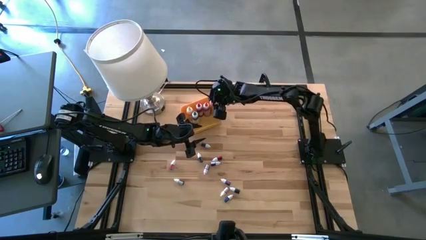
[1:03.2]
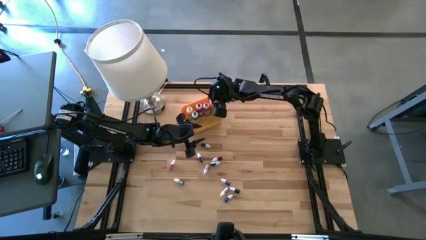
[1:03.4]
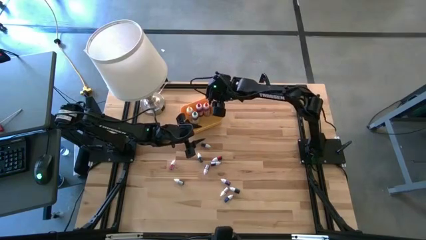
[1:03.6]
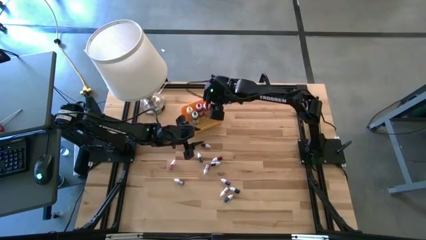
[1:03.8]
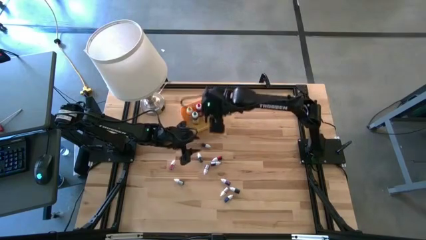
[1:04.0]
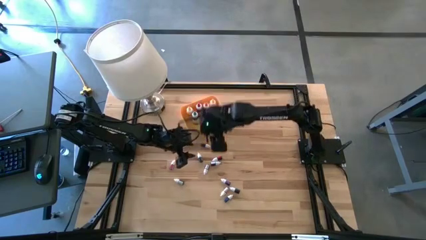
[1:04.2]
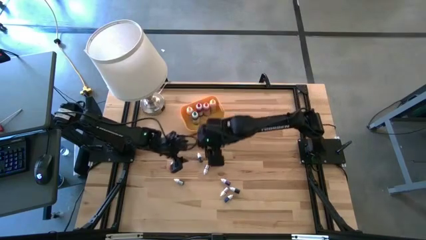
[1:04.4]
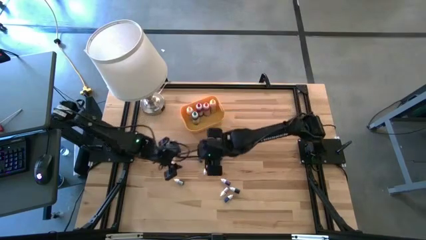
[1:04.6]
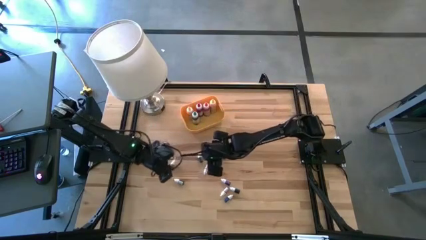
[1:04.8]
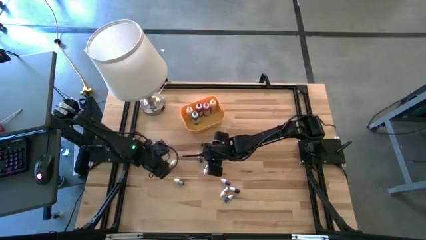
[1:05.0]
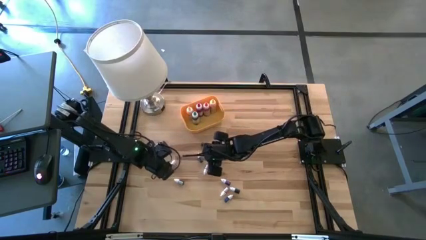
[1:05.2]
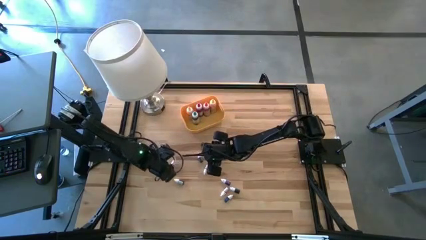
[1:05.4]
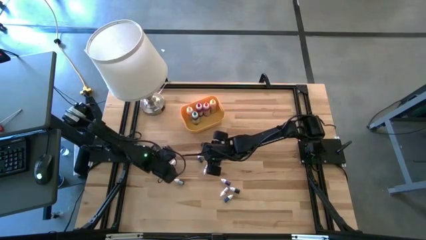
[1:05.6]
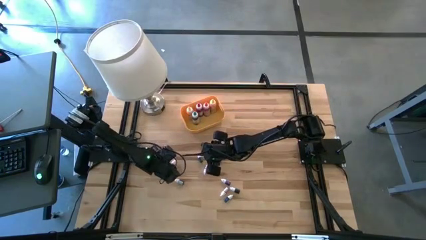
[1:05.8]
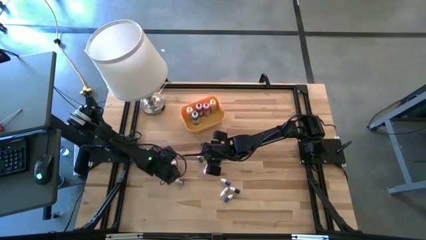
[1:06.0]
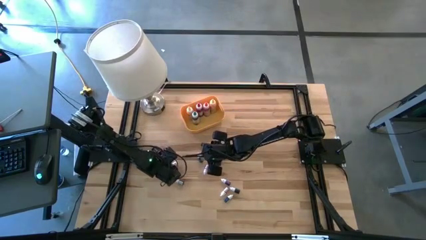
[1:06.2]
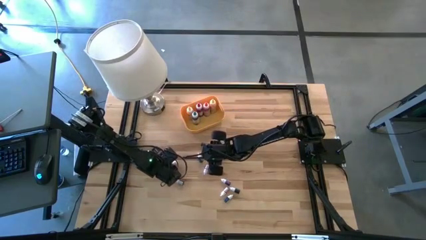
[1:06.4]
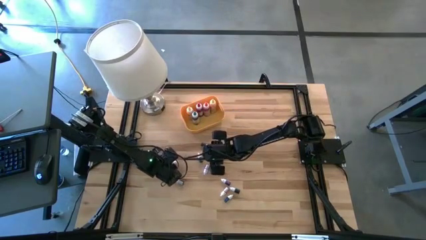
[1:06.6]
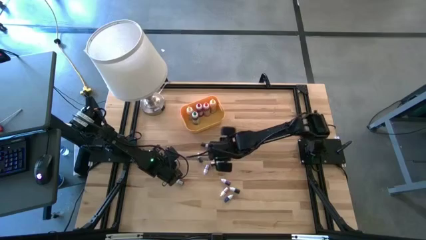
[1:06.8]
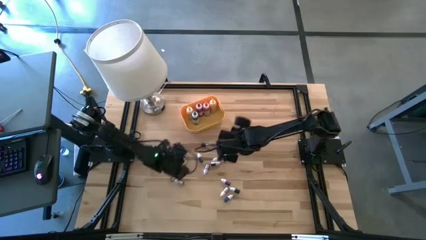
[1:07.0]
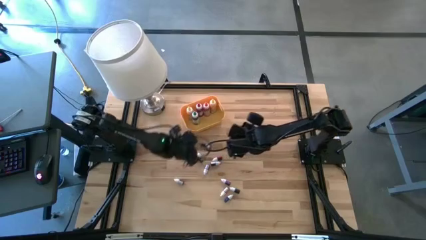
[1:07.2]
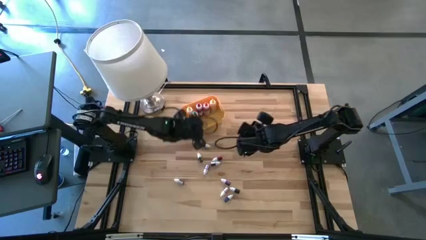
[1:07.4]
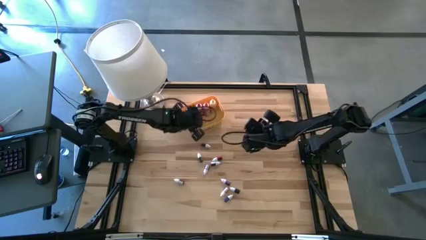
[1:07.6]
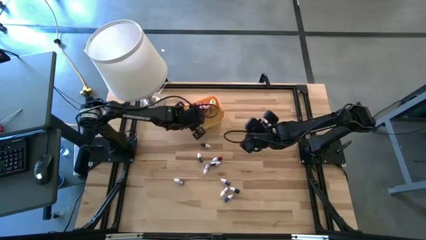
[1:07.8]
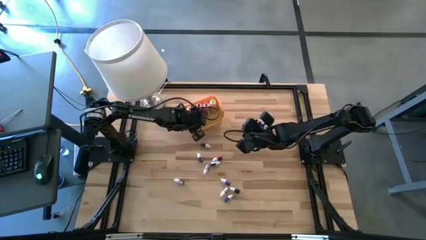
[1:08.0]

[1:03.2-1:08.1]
Task: Pick & Place food coloring
Put the small pink food coloring bottle into the bin

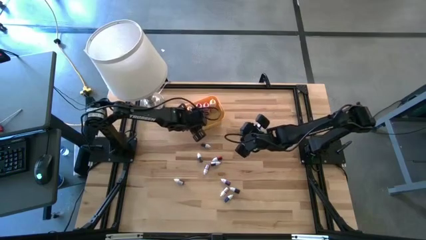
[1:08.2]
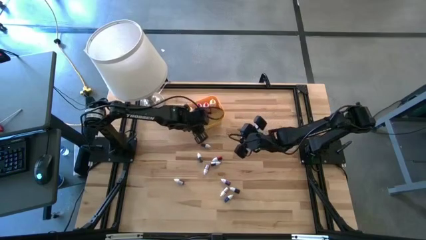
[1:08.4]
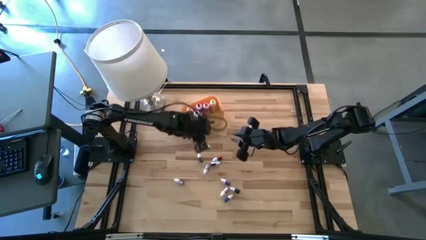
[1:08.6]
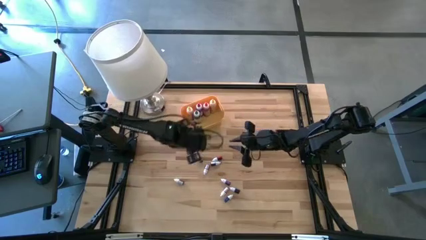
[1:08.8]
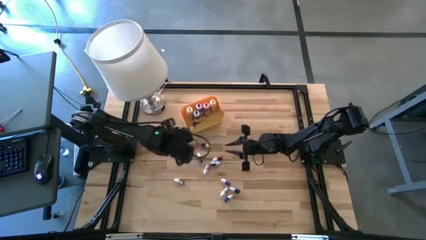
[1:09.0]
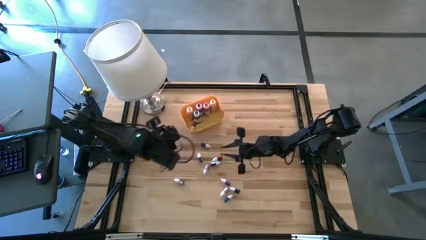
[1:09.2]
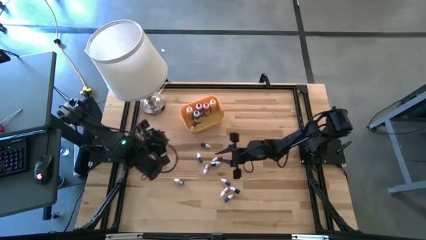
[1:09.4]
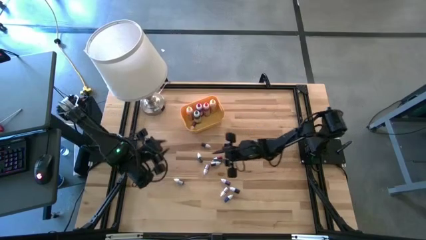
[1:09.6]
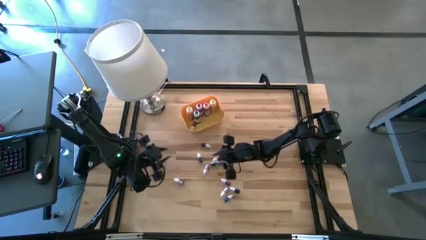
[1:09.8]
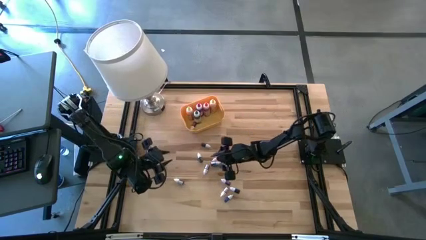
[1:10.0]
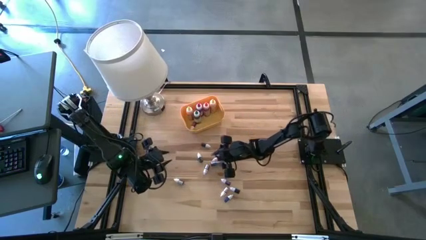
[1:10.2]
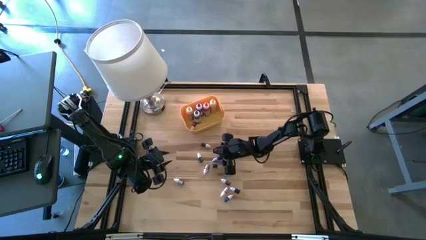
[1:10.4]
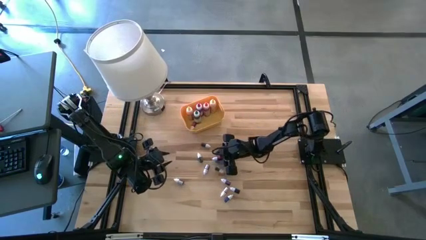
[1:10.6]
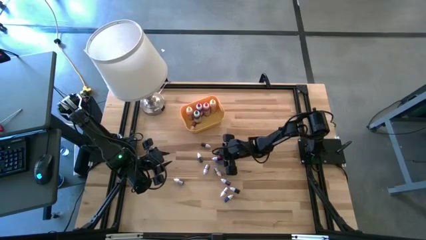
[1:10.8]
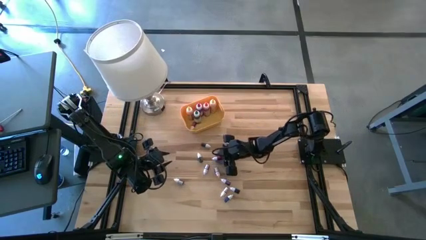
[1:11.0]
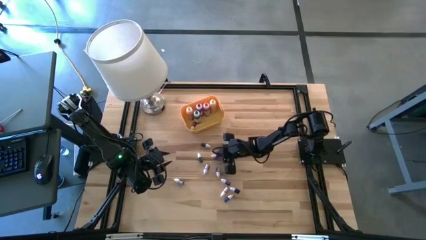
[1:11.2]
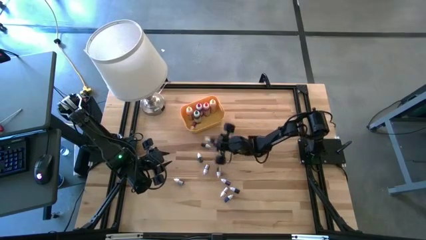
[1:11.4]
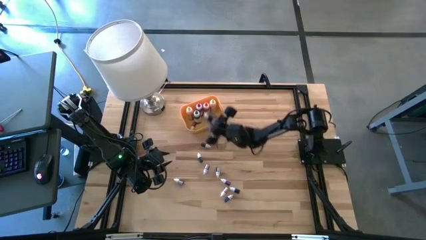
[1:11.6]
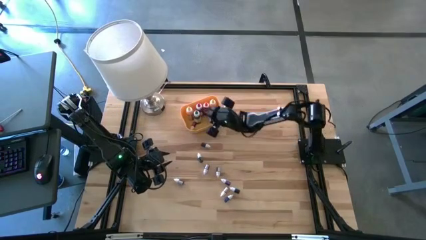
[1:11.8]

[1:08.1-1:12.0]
Put the small red food coloring bottle into the bin

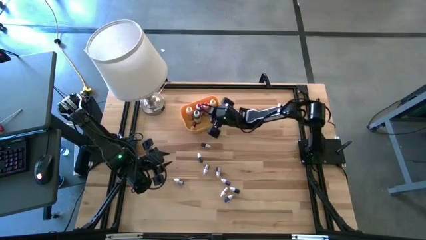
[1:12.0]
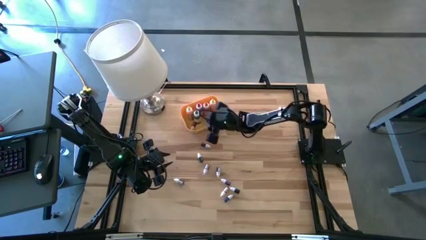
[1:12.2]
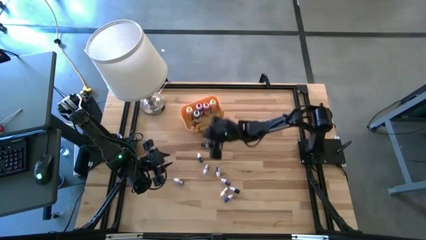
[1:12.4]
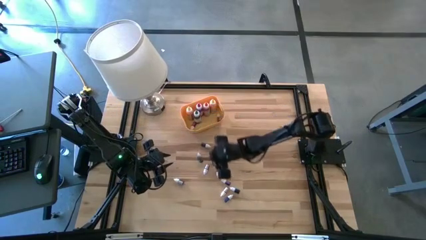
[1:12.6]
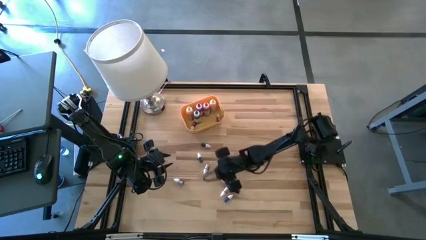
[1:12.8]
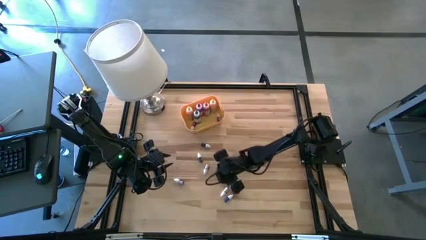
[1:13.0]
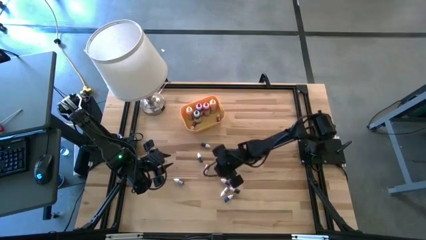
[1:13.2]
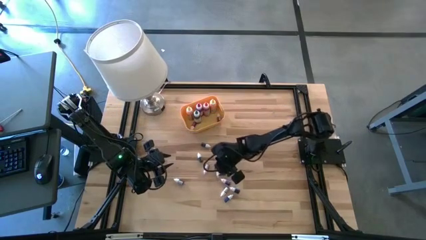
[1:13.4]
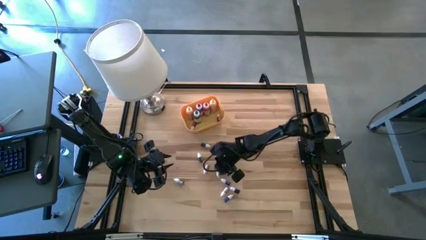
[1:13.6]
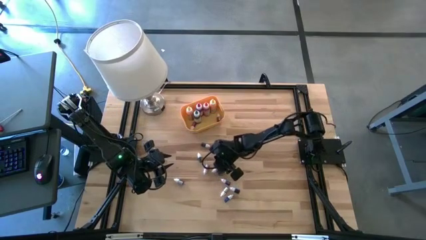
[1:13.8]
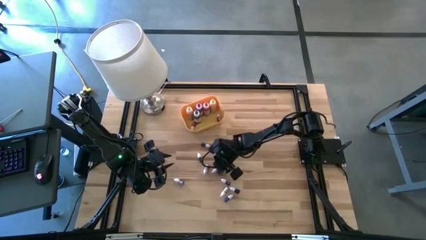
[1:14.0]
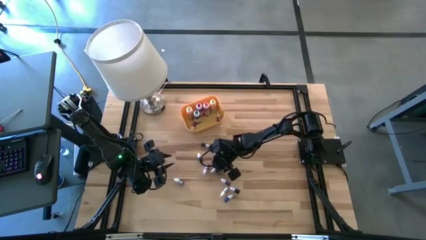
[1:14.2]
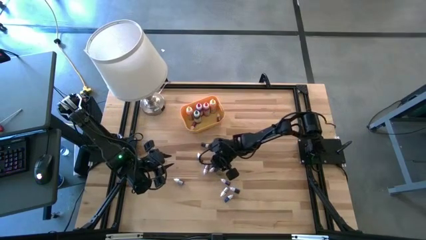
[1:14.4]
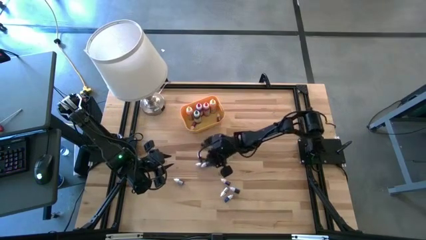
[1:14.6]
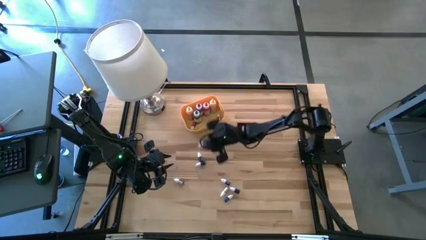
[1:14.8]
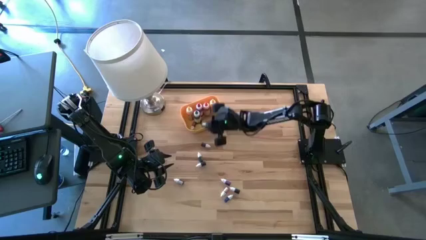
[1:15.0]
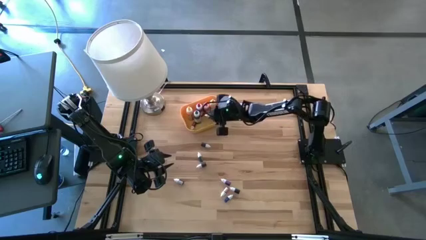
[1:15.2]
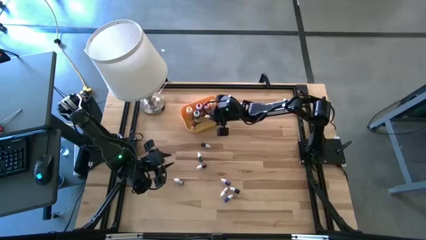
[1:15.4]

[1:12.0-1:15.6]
Put the top small dark blue food coloring bottle into the bin

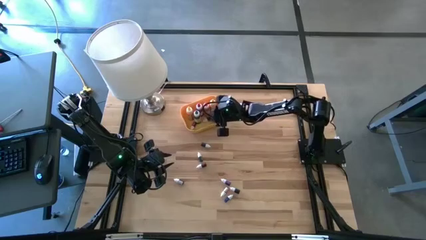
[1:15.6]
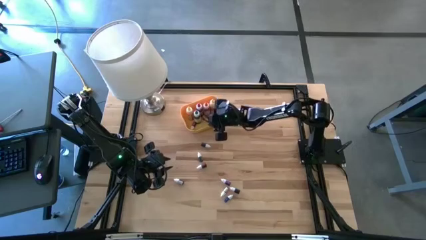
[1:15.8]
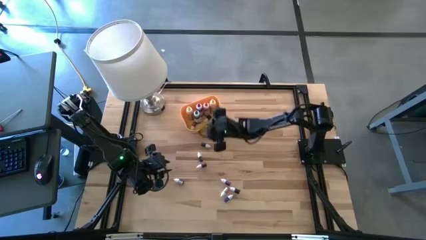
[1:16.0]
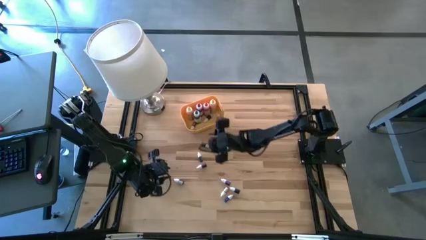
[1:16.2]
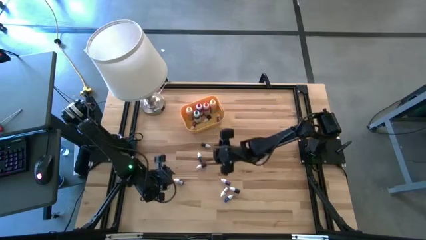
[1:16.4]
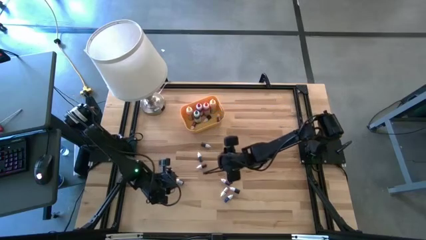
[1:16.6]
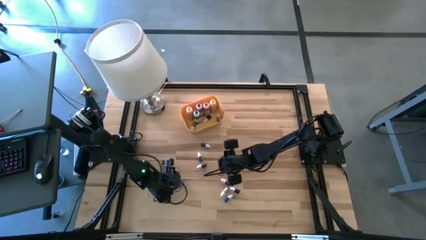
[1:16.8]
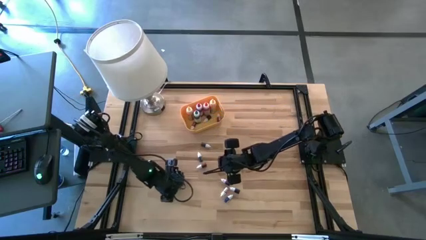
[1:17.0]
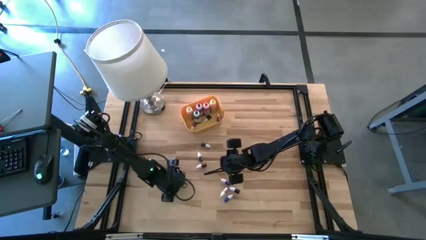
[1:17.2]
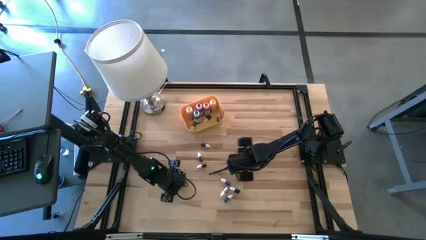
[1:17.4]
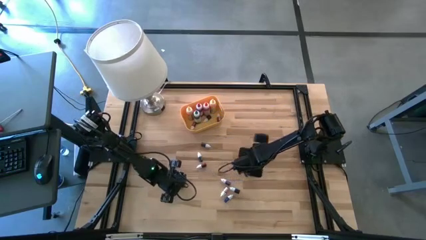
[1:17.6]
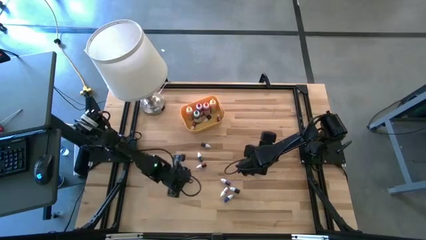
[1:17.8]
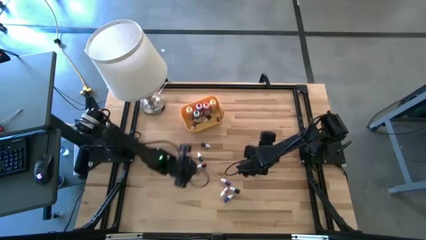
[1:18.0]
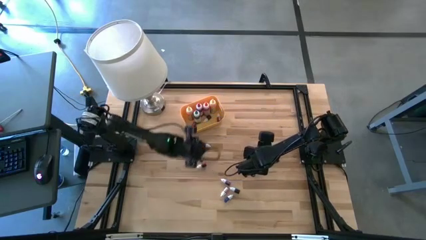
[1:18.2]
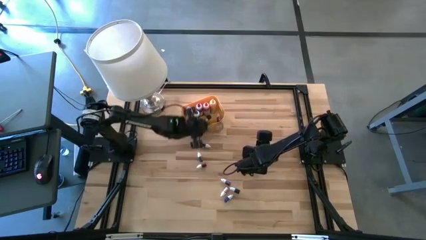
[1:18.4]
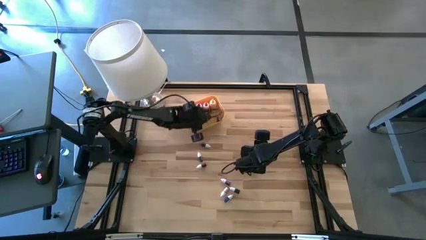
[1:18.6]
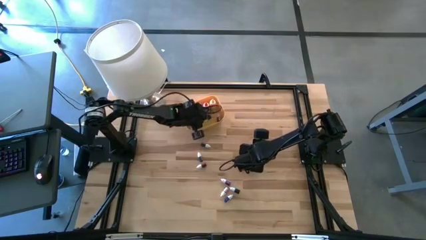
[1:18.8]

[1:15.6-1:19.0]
Put the bottom small black food coloring bottle into the bin
